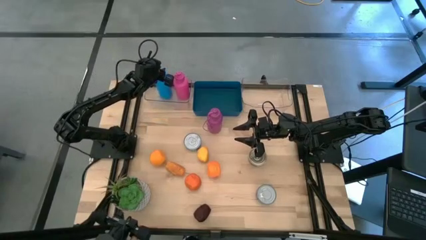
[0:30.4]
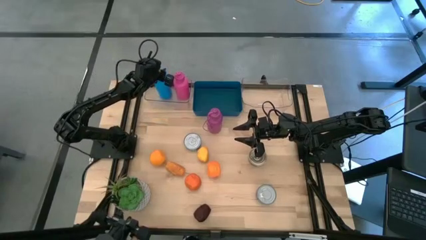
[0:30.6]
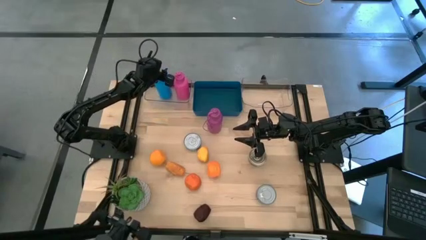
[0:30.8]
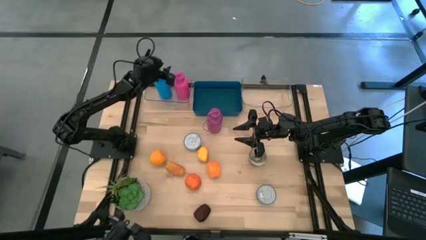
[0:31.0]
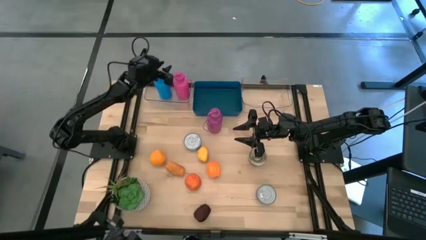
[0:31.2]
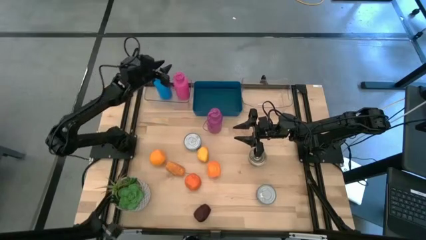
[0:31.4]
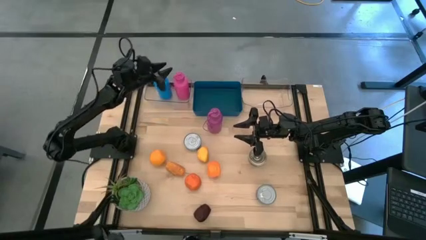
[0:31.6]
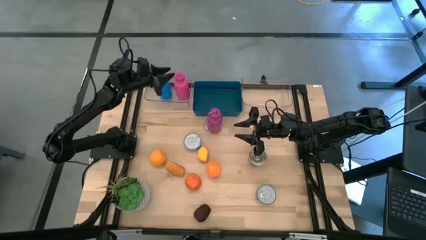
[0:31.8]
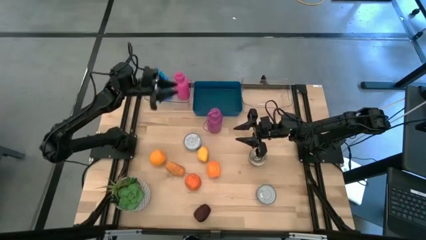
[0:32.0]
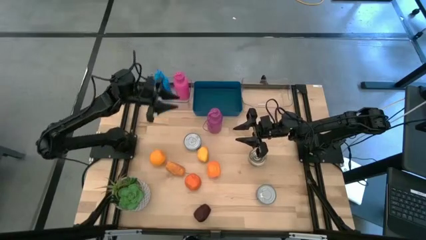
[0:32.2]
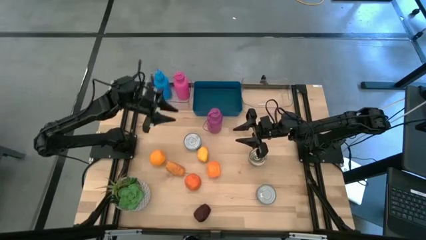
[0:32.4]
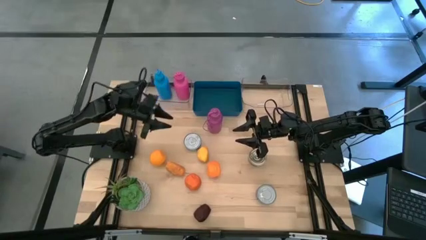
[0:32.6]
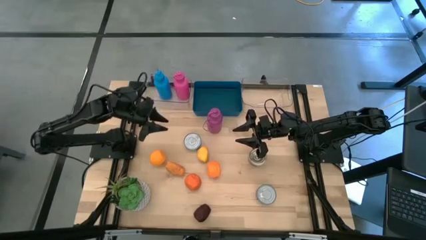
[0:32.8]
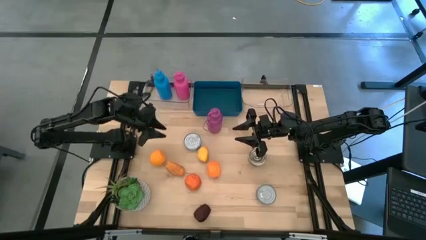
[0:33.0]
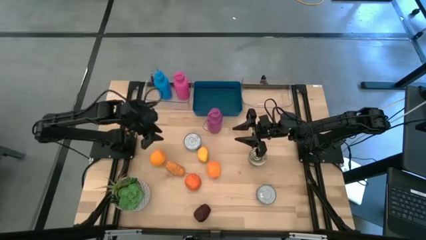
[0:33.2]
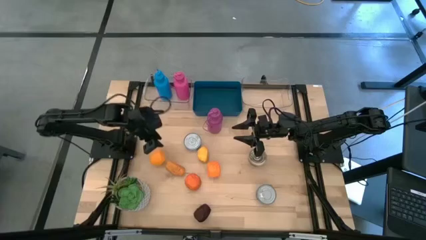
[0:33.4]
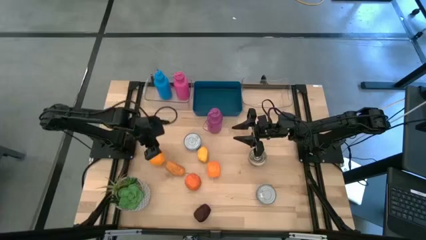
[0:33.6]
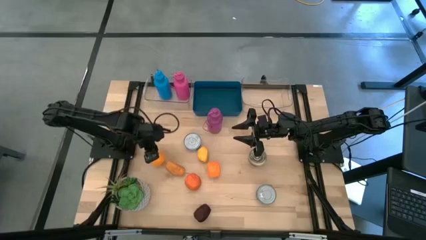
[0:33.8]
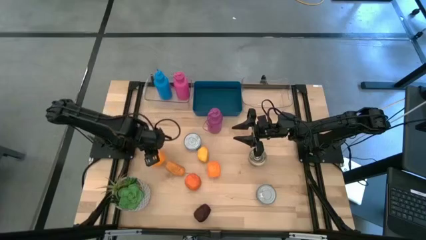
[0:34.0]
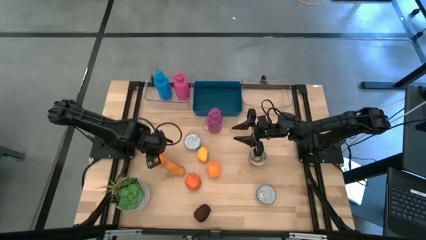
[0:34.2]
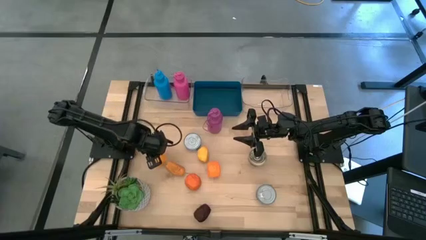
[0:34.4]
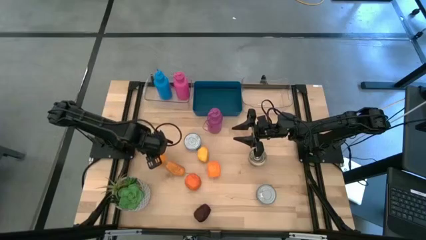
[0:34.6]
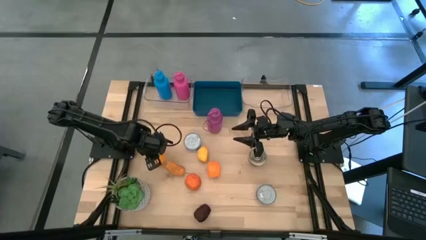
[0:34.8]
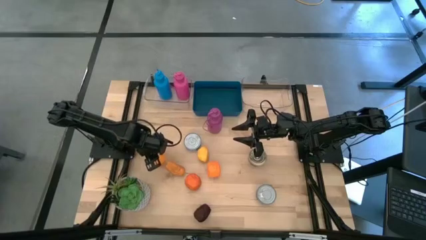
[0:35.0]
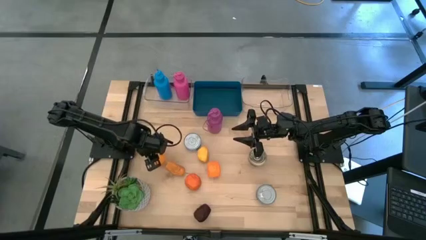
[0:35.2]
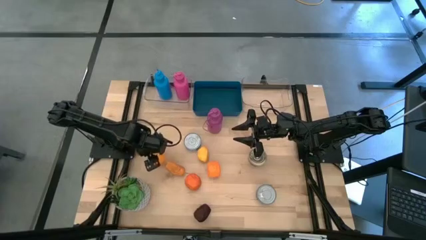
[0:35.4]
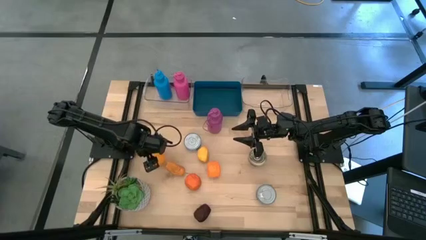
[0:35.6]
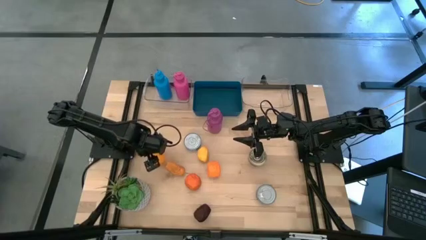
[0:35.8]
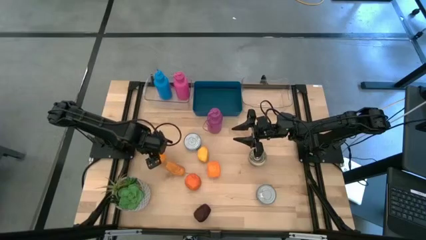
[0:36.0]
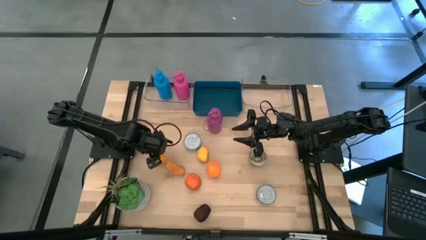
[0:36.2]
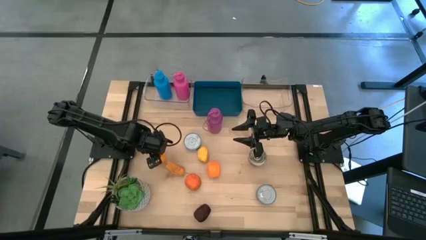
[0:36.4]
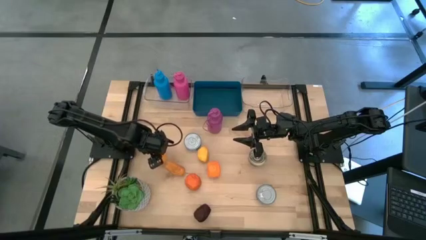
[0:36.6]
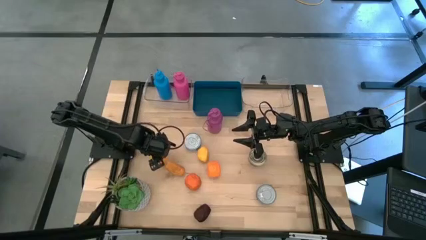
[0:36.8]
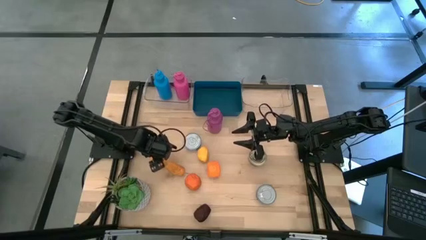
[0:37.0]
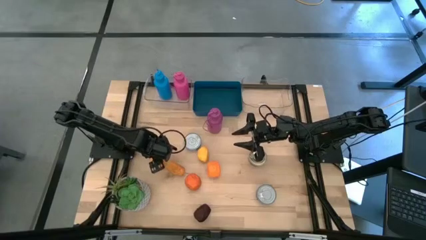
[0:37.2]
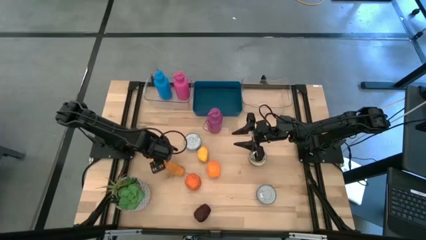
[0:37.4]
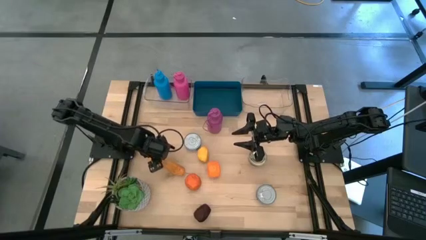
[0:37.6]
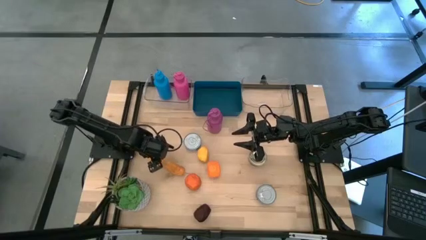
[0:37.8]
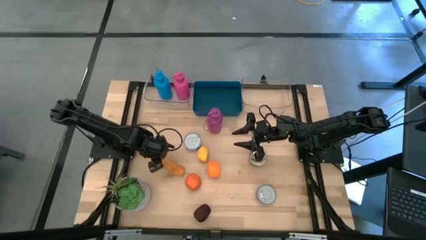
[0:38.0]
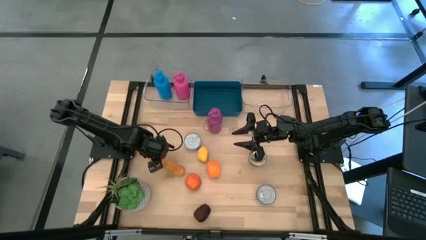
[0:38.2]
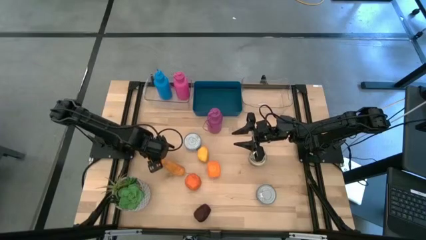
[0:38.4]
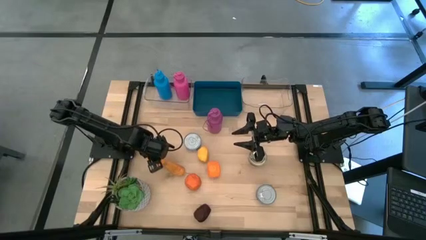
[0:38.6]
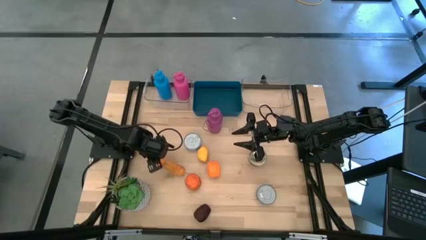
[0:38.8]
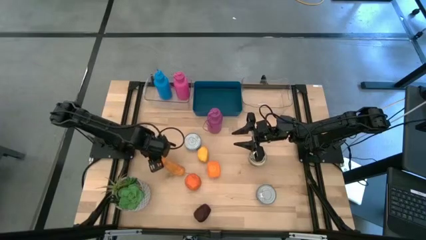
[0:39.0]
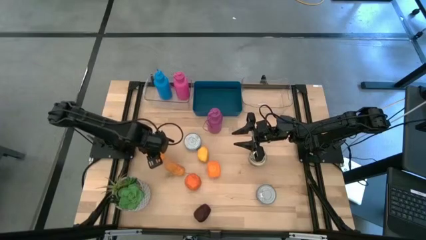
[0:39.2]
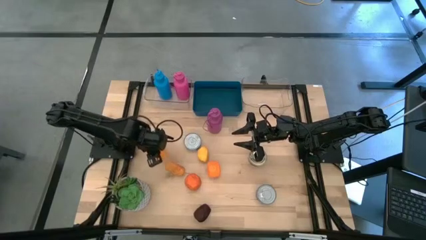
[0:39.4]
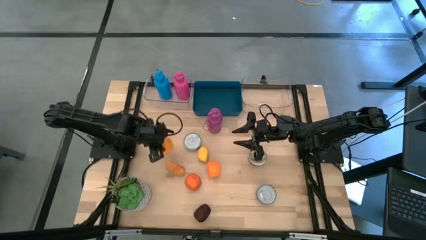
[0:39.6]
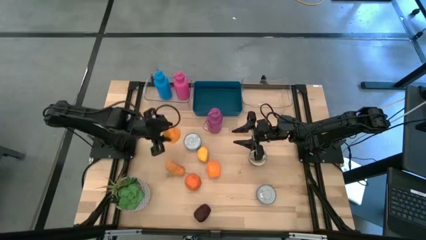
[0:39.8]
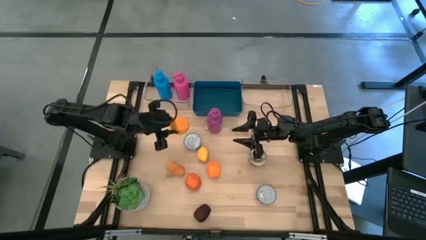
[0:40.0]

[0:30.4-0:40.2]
Task: Pick & Place Food Item
Put the left orange into the blue bin

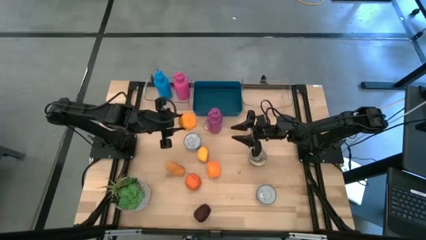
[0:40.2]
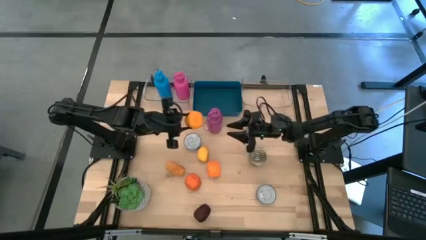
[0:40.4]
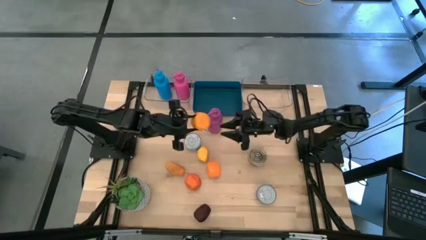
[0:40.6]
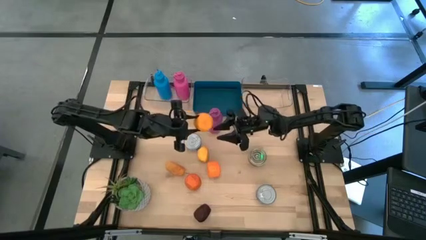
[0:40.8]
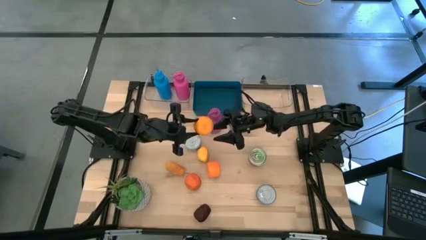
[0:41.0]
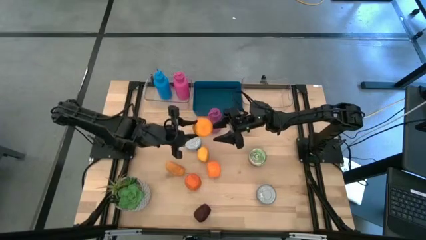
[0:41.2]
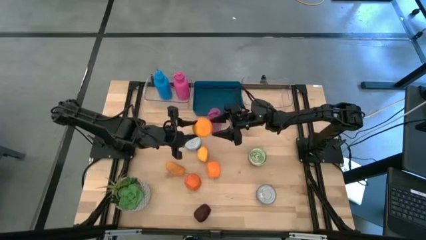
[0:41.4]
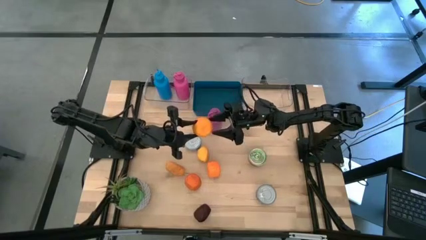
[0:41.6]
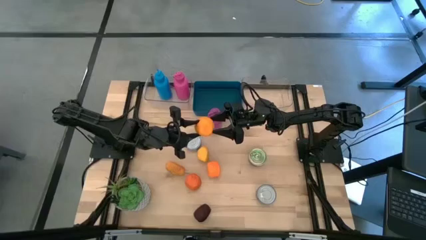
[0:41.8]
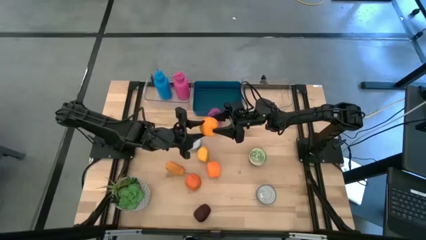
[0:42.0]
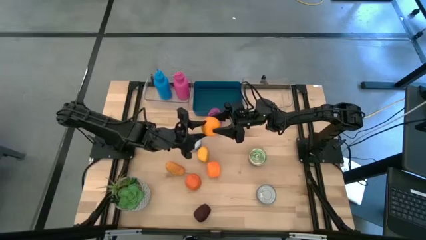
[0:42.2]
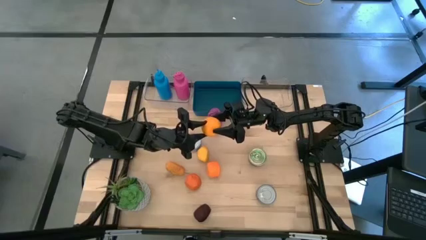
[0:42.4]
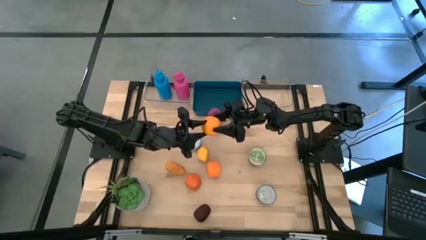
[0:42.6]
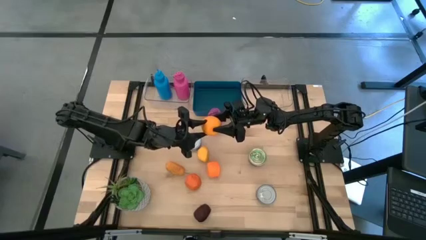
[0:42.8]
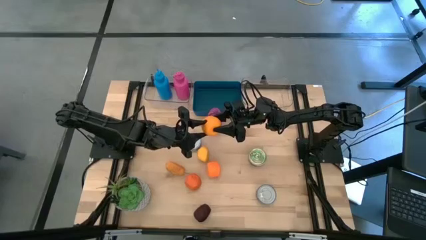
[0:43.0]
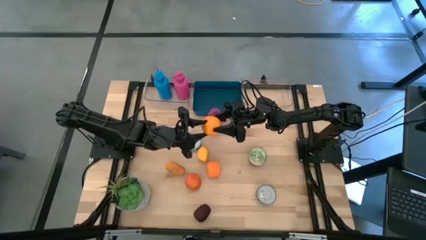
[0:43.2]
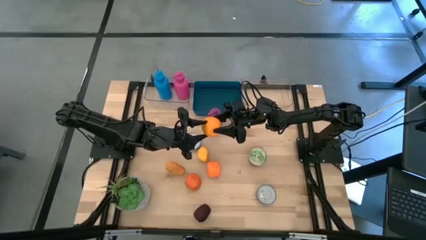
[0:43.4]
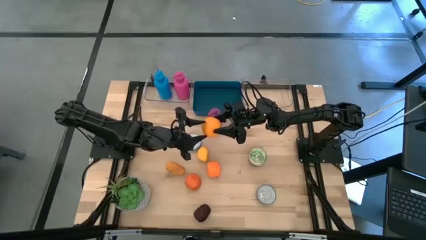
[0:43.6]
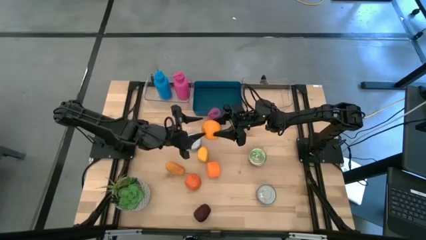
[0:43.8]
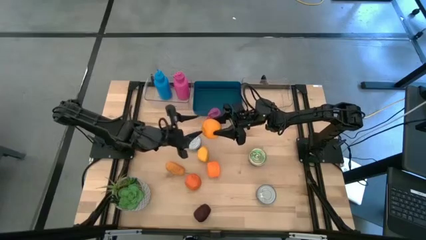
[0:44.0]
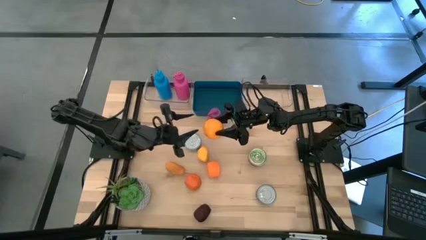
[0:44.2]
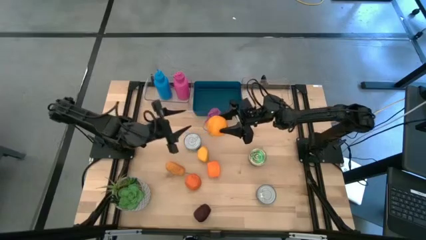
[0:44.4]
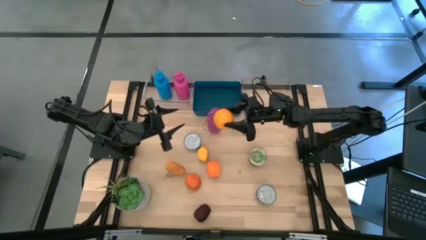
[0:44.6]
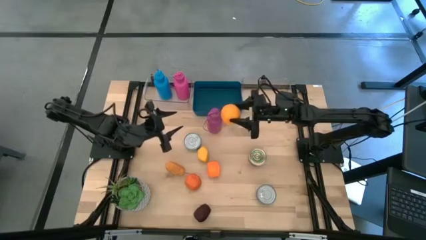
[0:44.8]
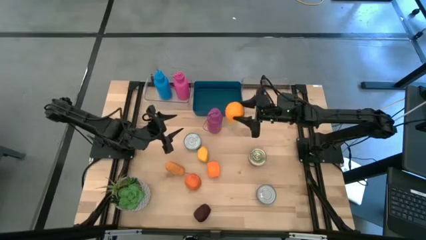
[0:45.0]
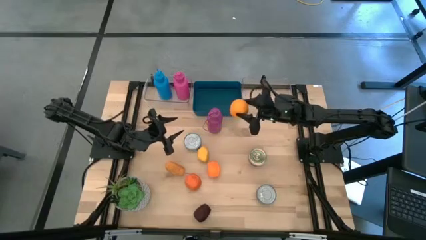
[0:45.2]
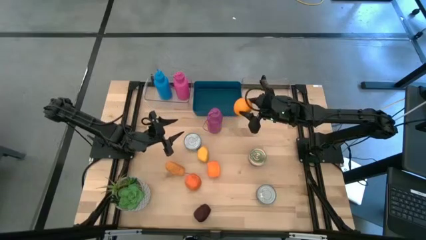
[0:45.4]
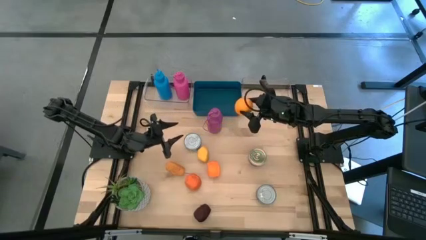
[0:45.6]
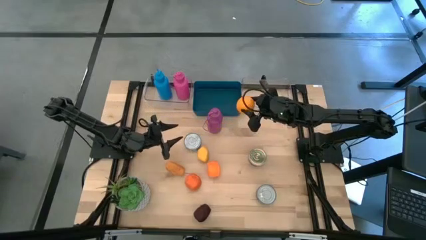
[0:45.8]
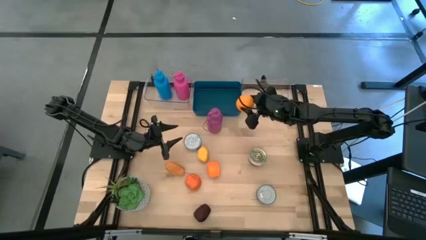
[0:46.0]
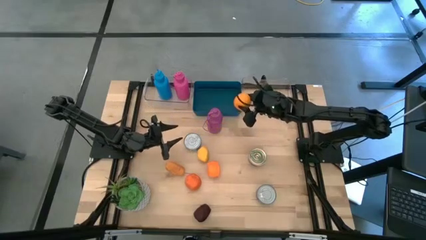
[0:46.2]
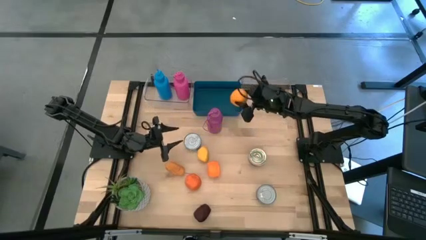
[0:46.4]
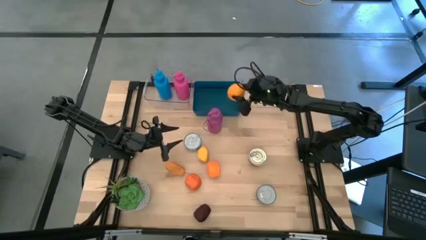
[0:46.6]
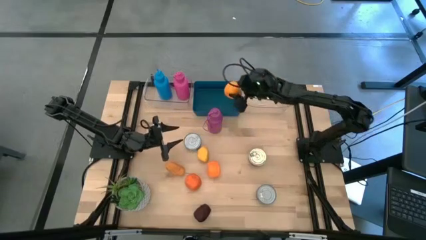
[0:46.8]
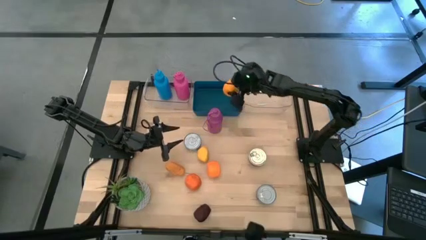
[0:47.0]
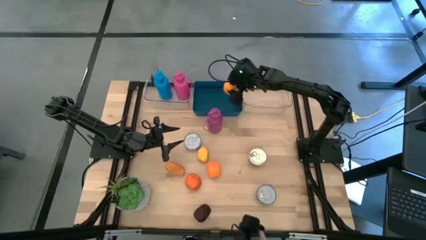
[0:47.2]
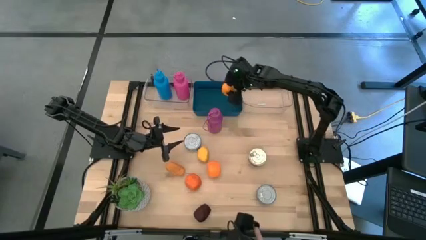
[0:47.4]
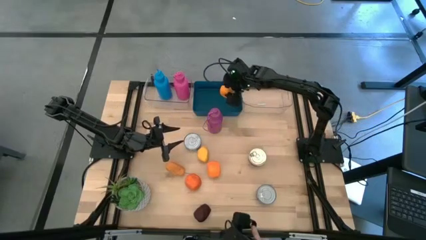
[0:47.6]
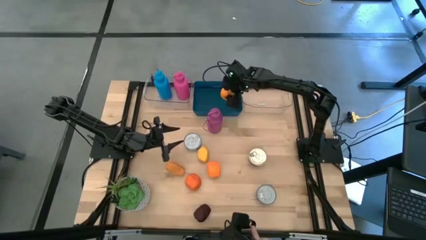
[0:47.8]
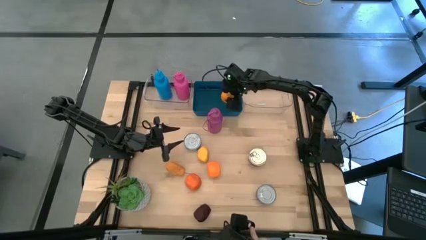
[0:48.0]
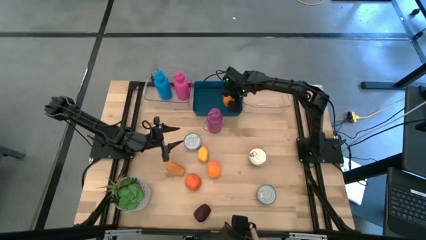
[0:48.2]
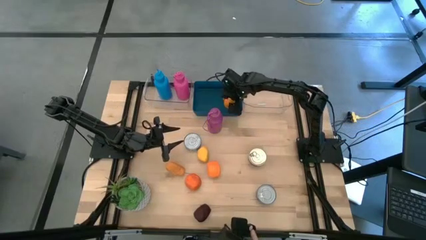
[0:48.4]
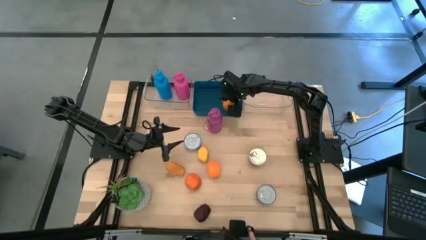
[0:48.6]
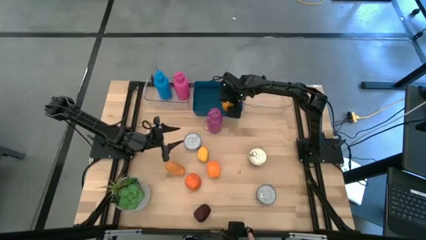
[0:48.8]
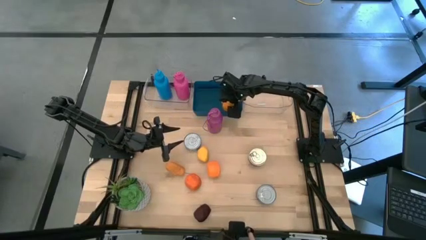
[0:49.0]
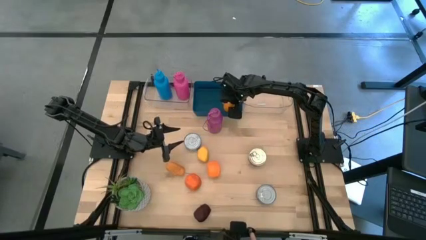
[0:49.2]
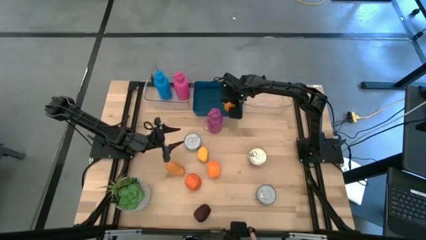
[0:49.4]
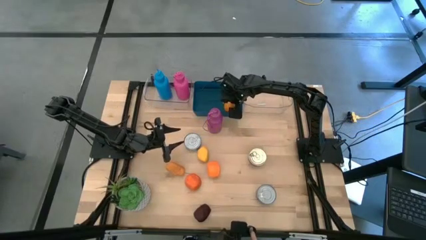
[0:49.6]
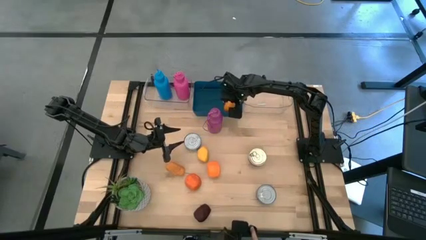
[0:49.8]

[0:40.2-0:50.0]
Put the left orange into the blue bin
